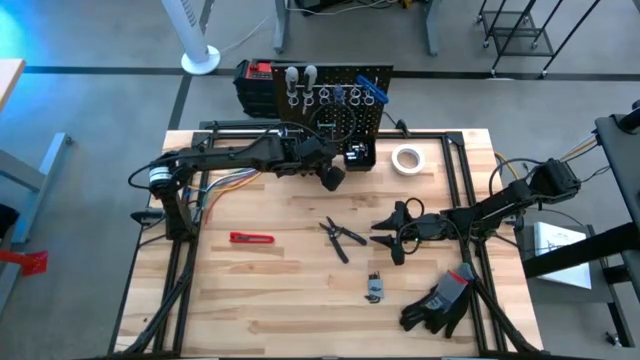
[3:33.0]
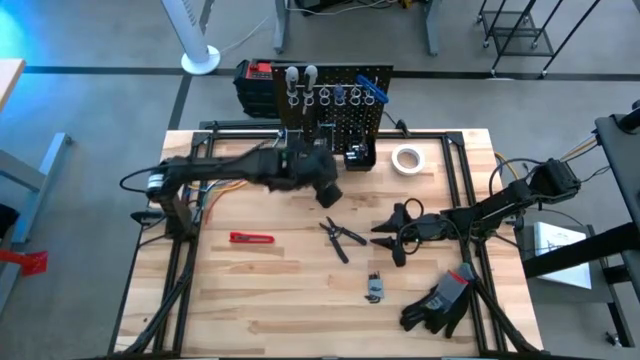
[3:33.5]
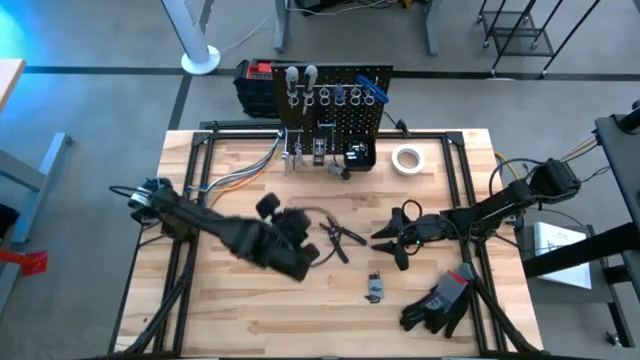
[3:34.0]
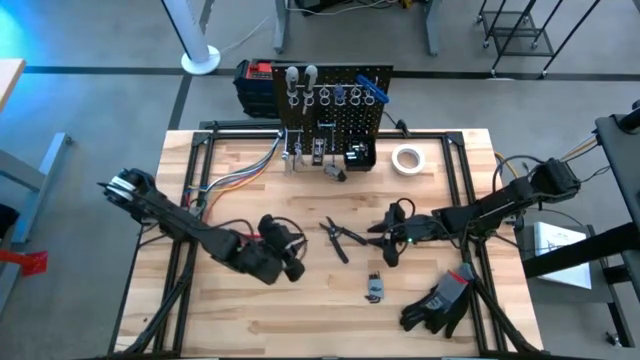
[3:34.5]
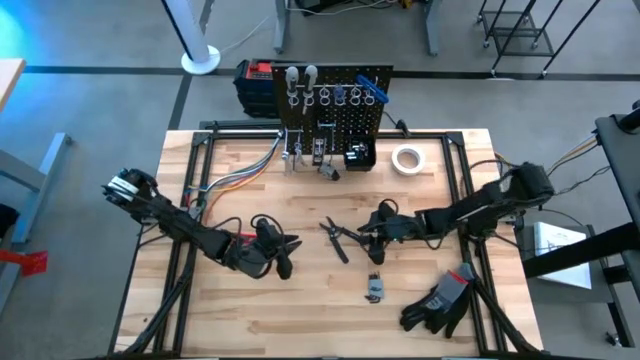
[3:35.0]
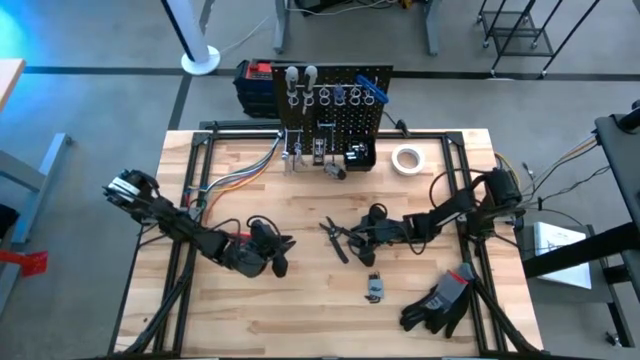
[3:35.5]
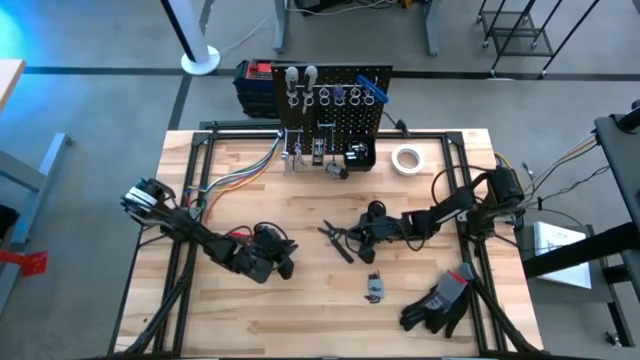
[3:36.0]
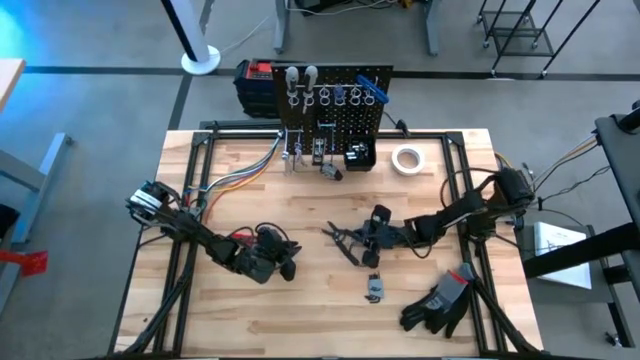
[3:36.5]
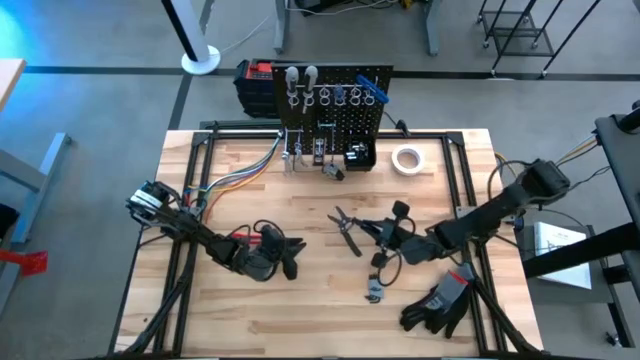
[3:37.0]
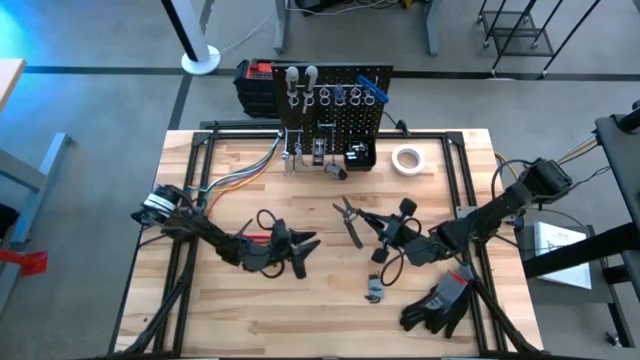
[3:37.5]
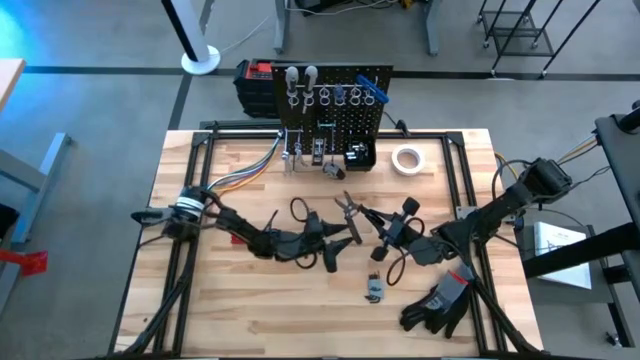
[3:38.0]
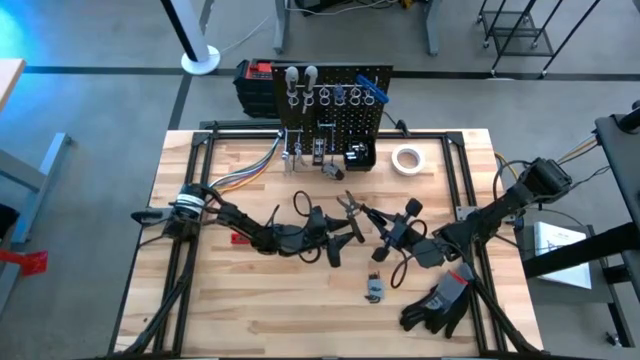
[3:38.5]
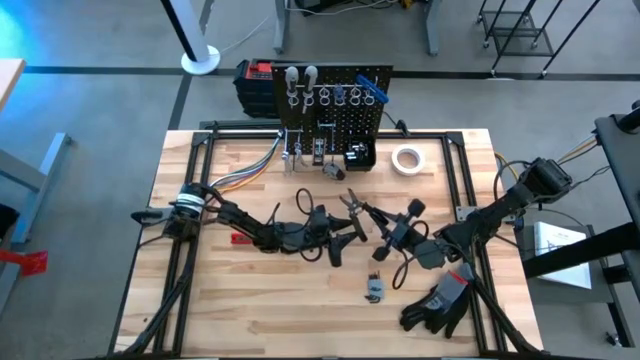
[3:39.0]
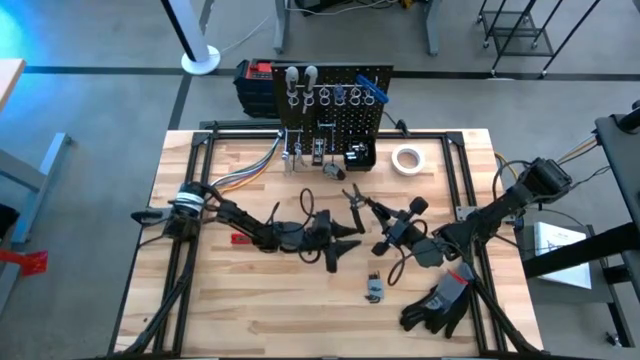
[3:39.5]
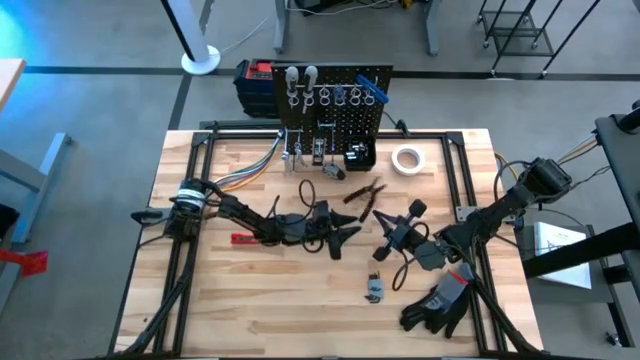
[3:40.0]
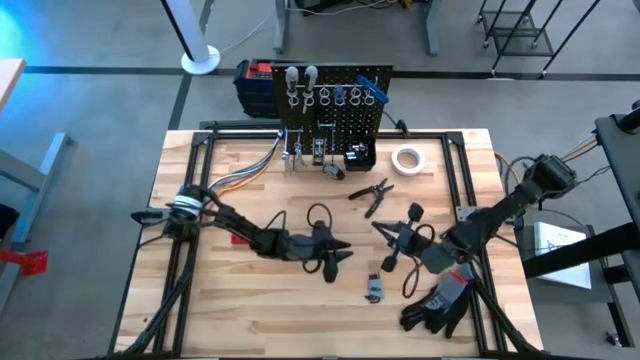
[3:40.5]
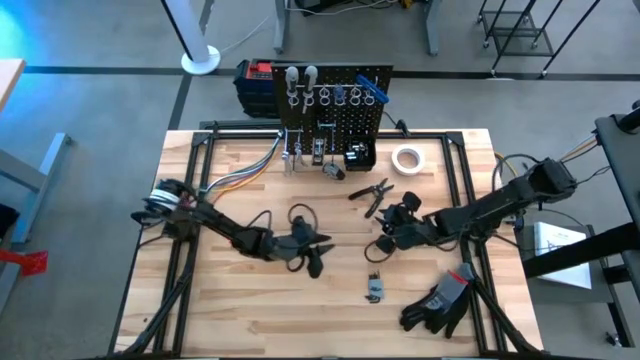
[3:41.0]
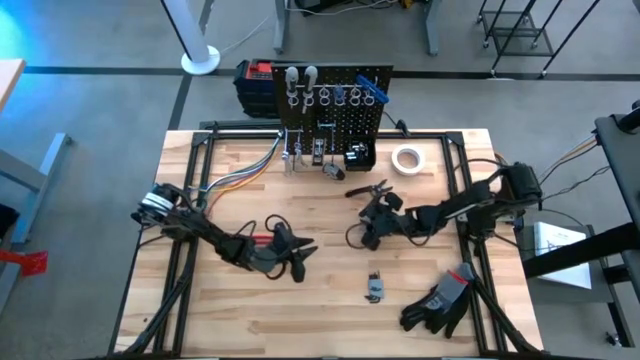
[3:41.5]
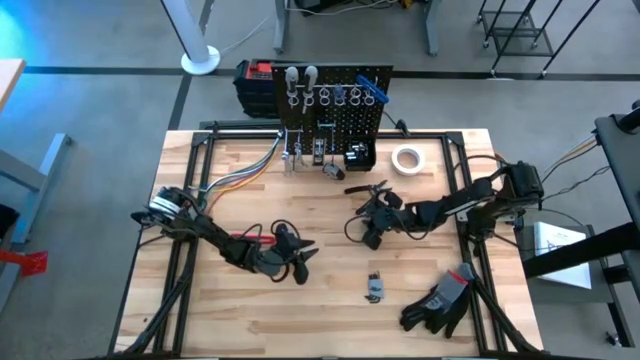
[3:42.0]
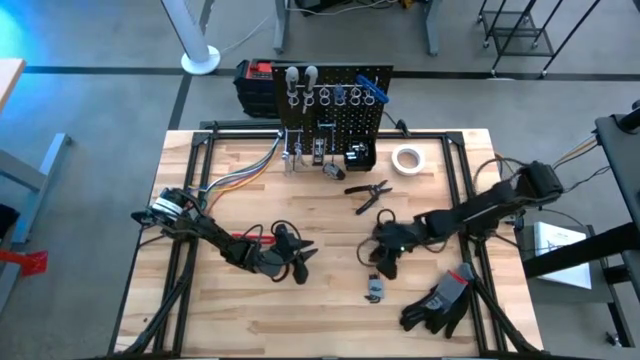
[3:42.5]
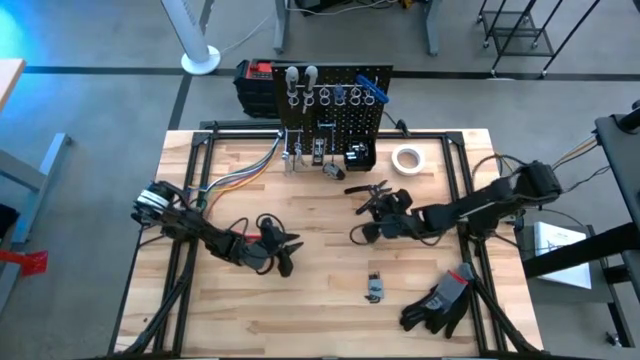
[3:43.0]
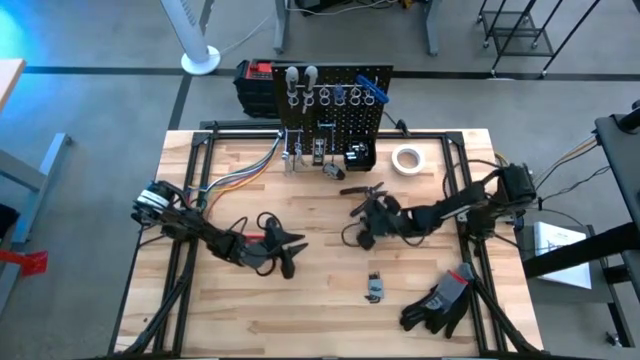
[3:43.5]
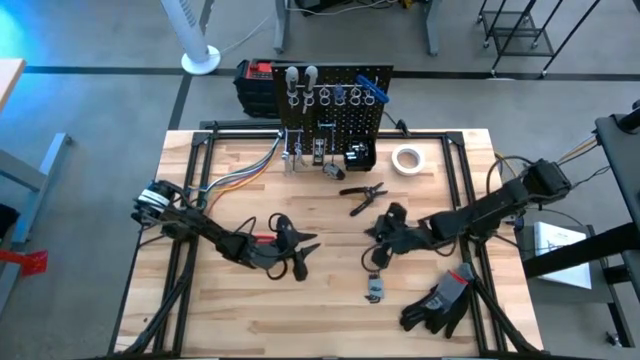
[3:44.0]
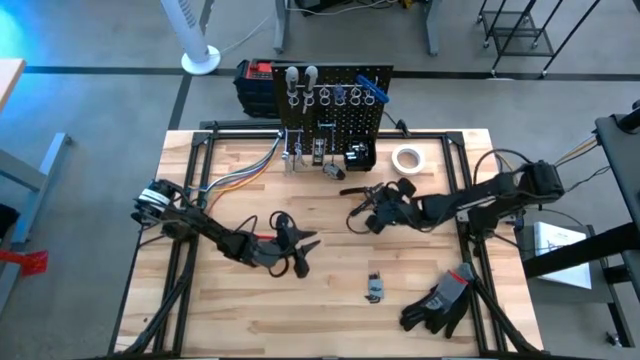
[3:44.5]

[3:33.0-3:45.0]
Task: Hang tools onto peg board
Hang the wire cutter on the peg board

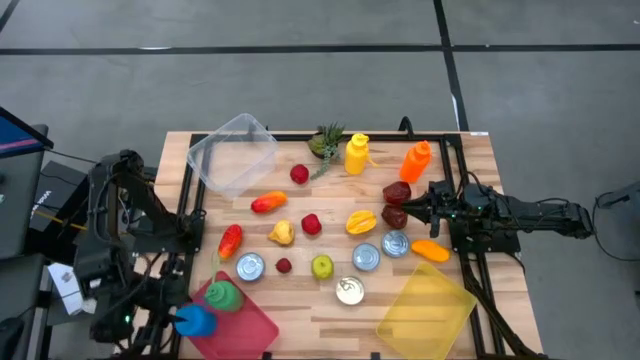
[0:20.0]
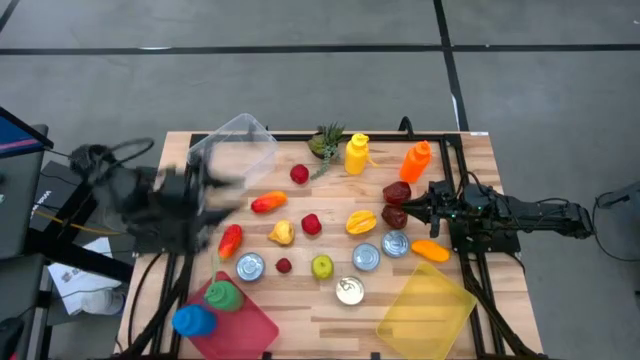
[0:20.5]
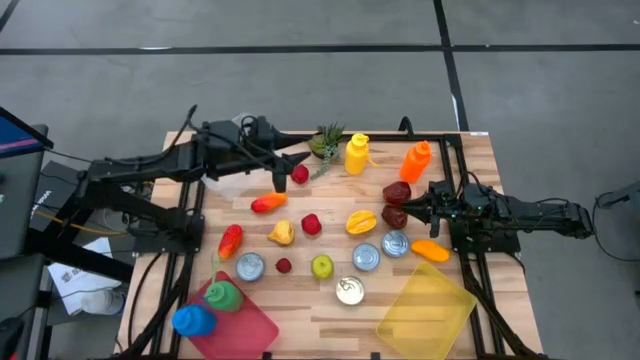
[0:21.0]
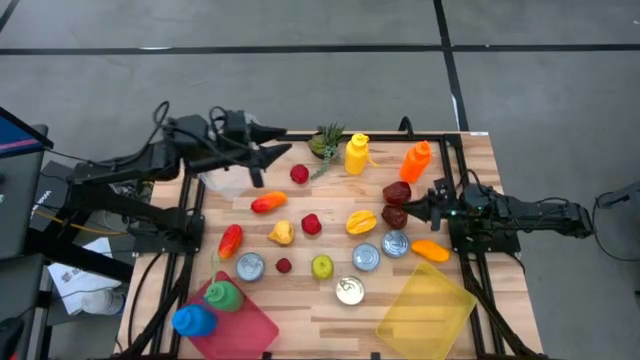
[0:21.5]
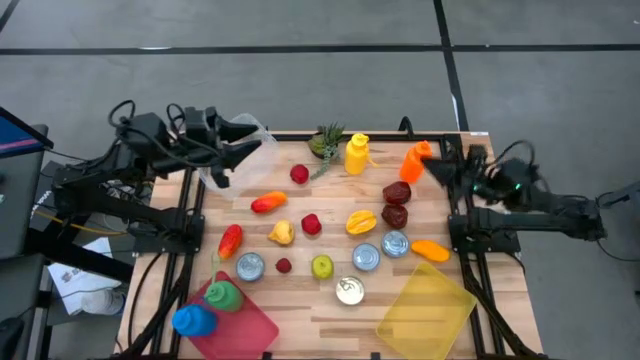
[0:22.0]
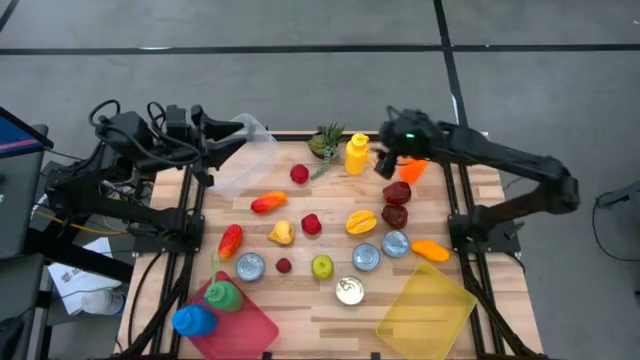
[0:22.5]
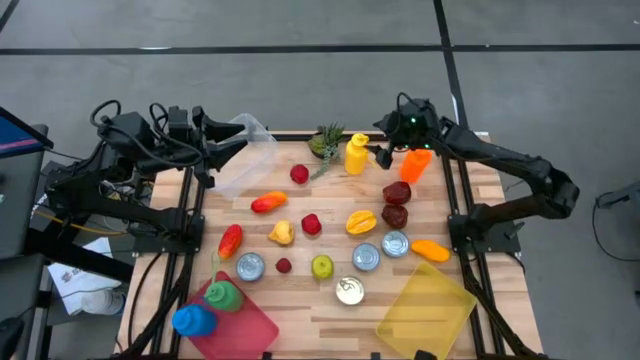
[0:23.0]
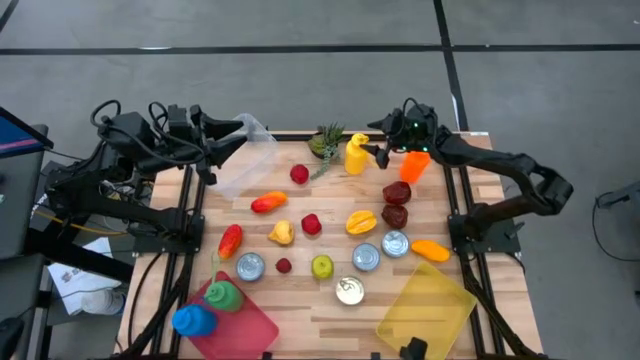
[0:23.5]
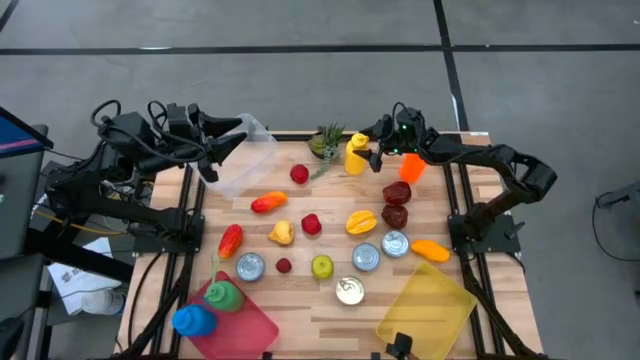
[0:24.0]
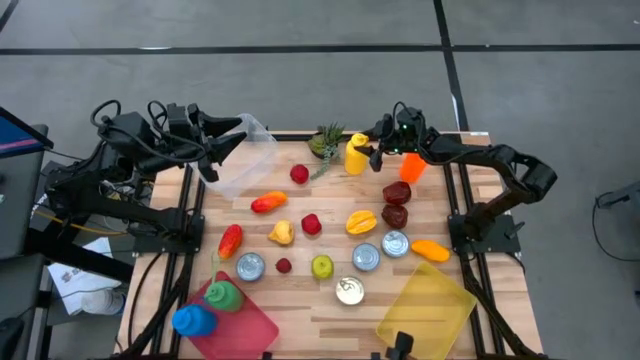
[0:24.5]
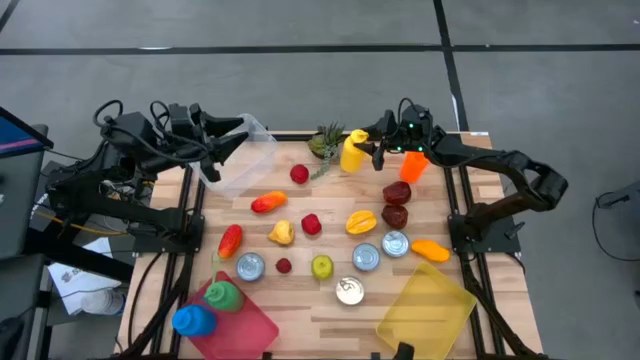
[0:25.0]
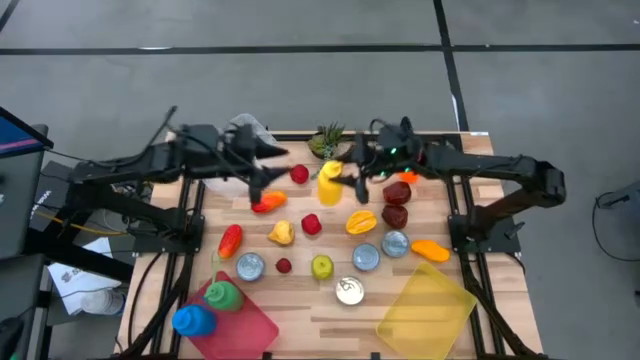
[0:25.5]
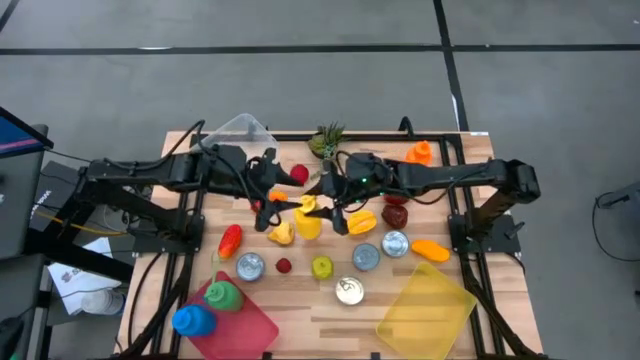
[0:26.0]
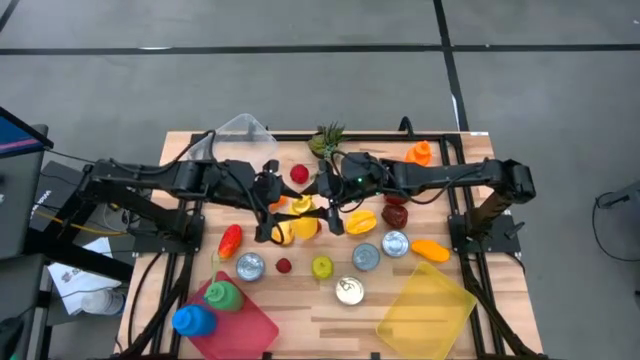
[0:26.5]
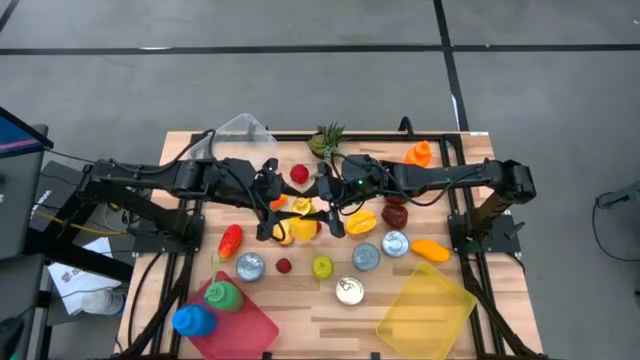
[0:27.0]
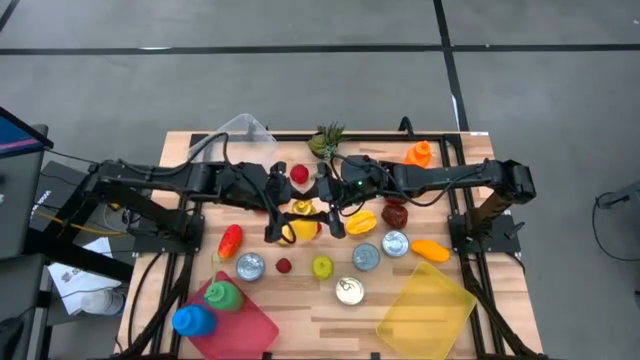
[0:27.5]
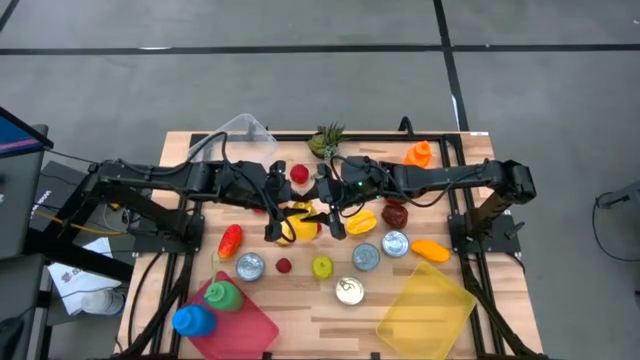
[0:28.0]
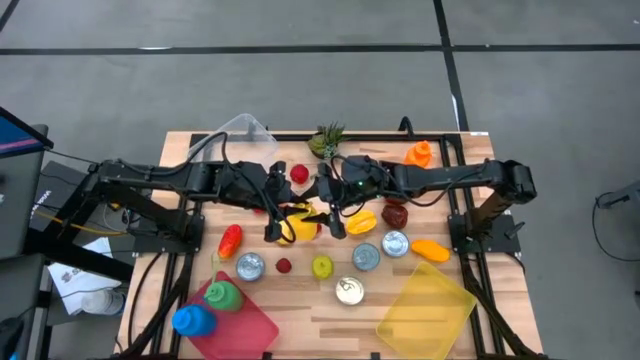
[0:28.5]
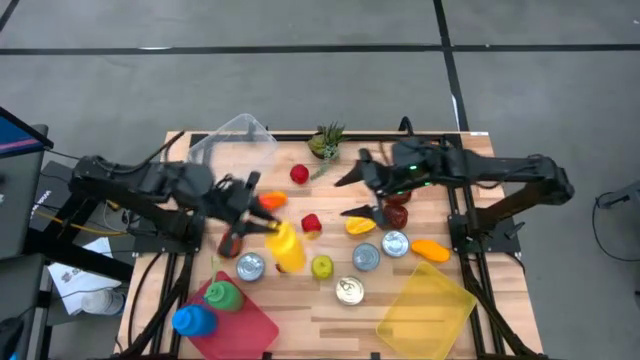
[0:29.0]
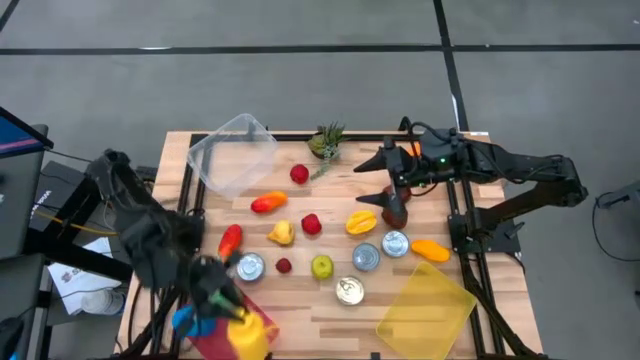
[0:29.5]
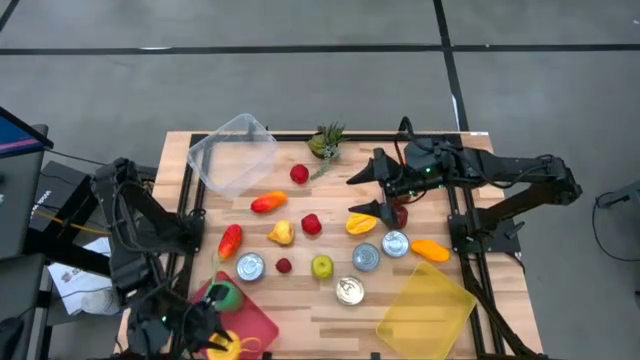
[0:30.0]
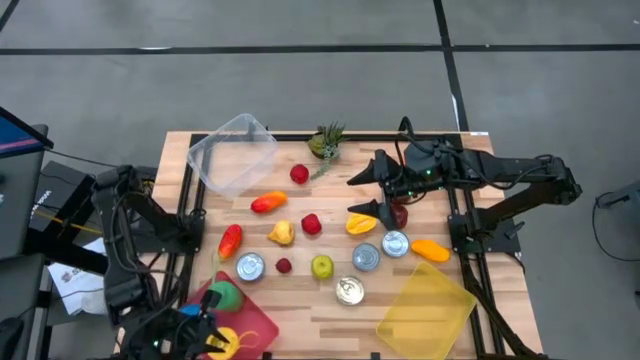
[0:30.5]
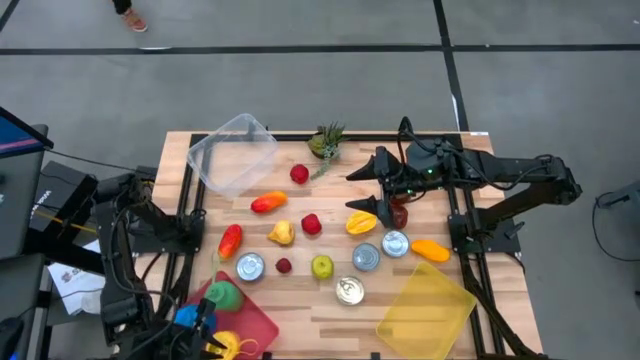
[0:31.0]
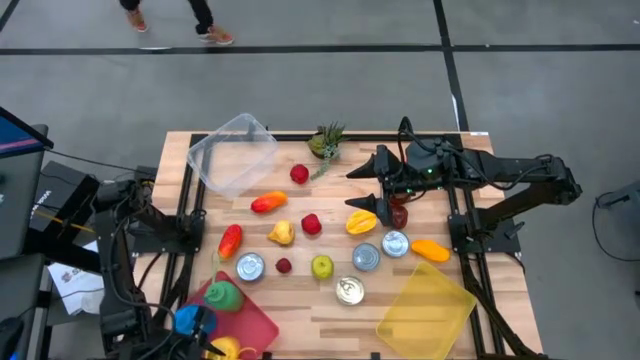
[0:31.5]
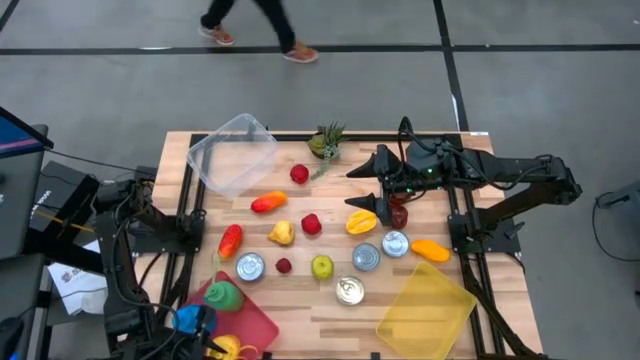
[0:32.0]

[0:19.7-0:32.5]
Task: Pick & Place Food Item
Put the yellow water bottle into the red bin
